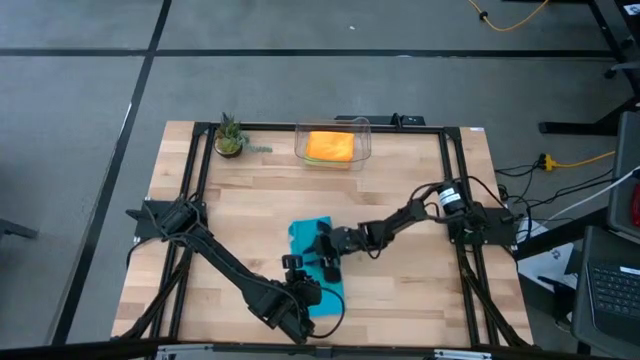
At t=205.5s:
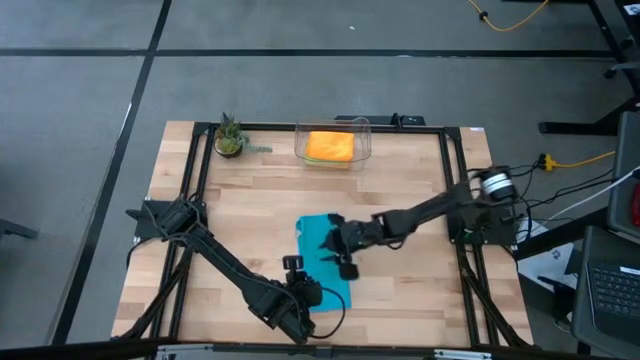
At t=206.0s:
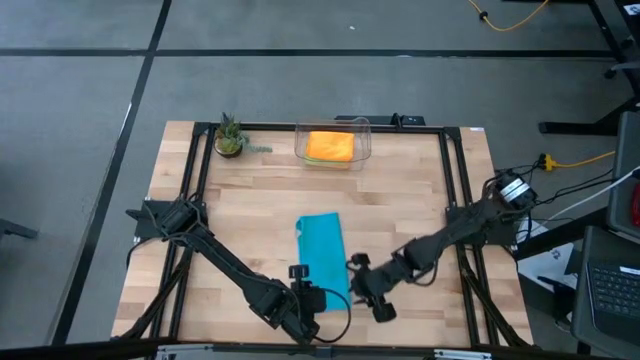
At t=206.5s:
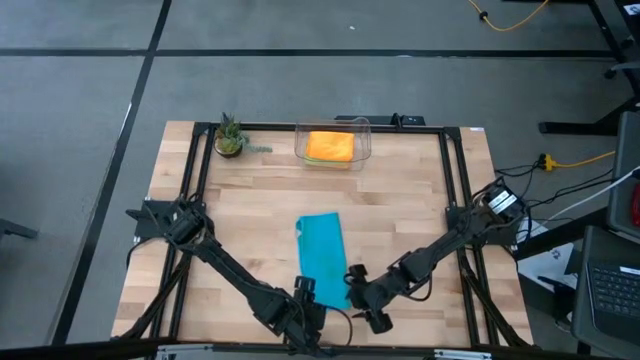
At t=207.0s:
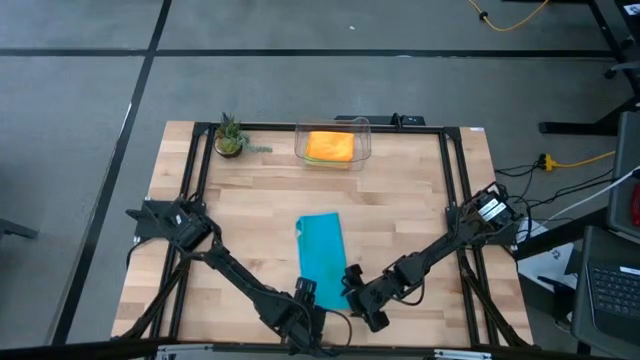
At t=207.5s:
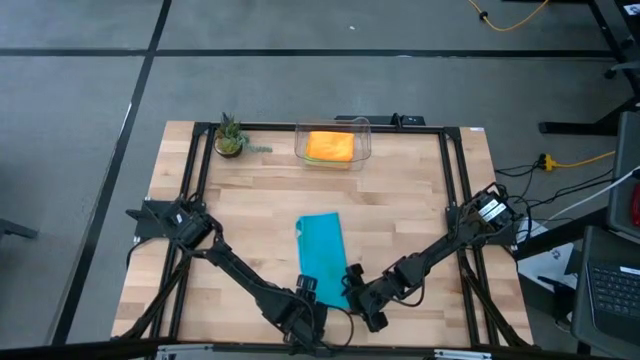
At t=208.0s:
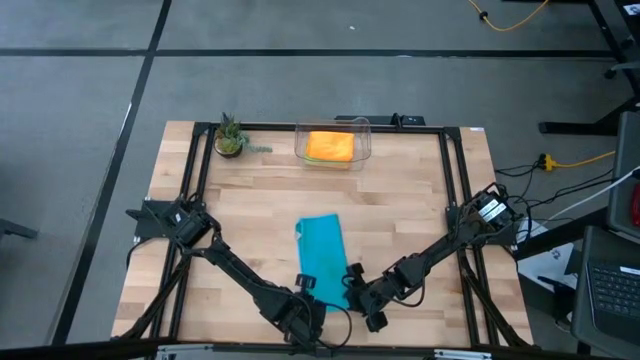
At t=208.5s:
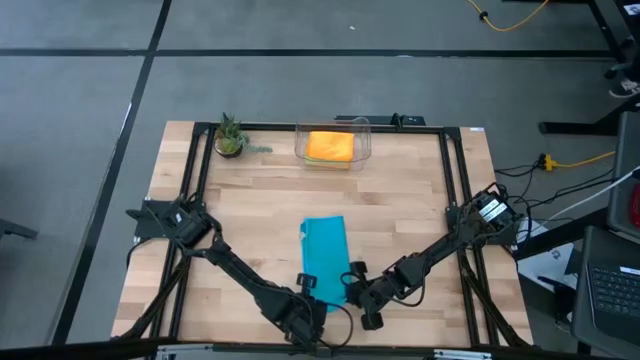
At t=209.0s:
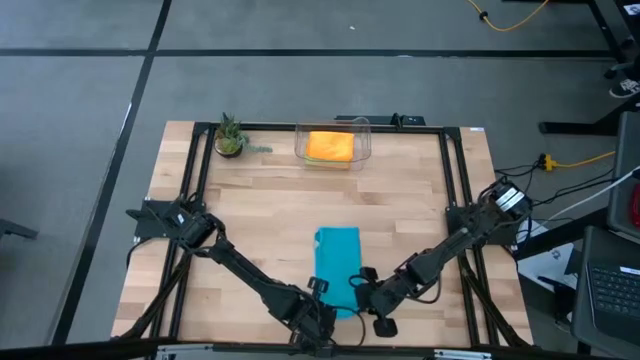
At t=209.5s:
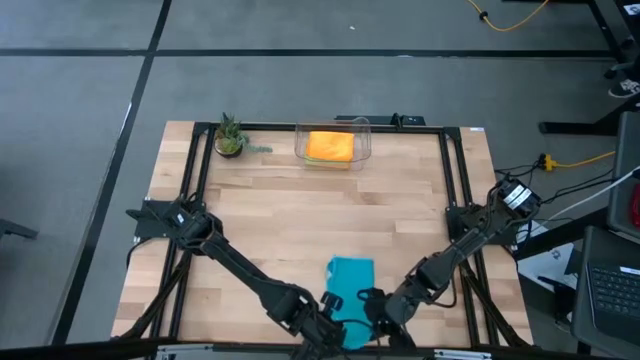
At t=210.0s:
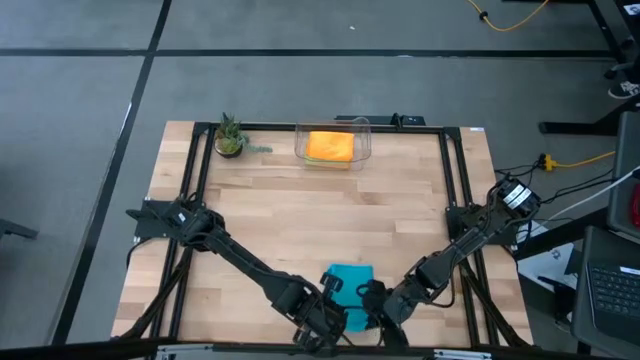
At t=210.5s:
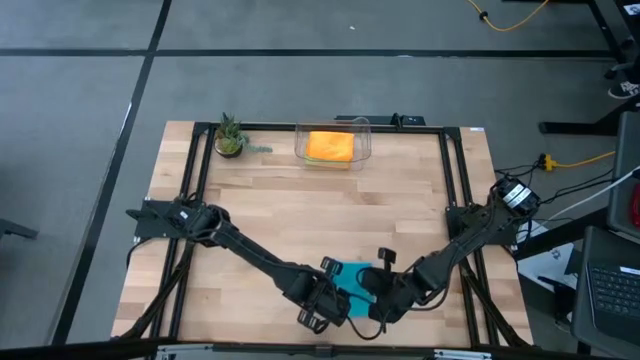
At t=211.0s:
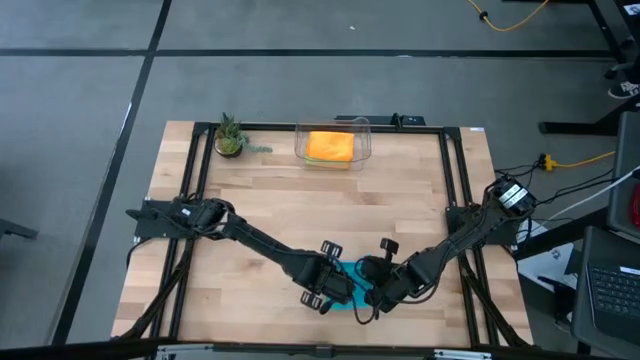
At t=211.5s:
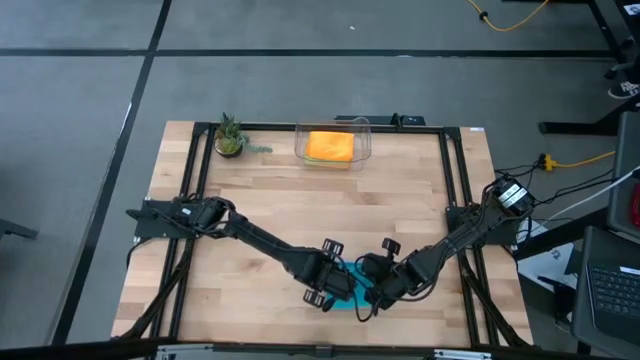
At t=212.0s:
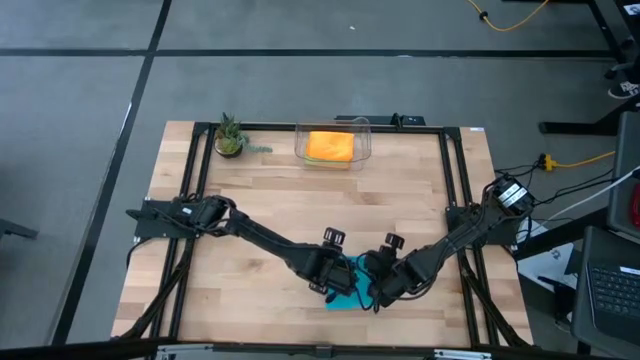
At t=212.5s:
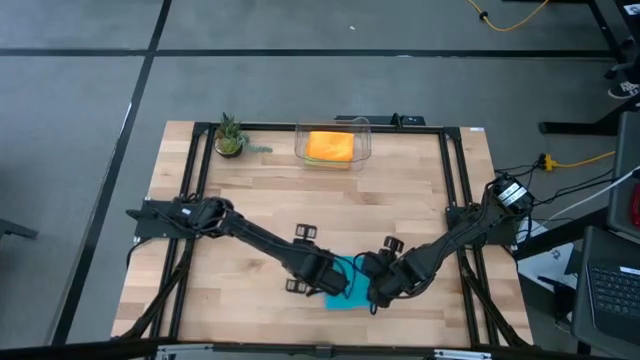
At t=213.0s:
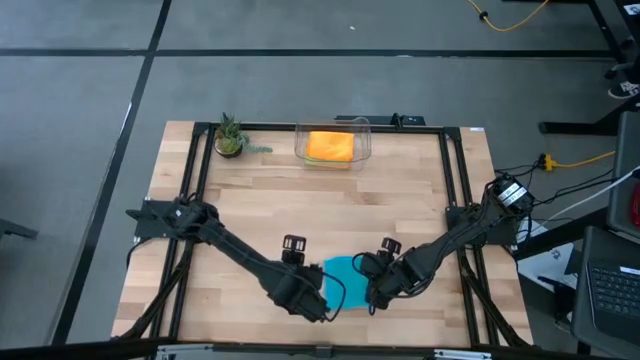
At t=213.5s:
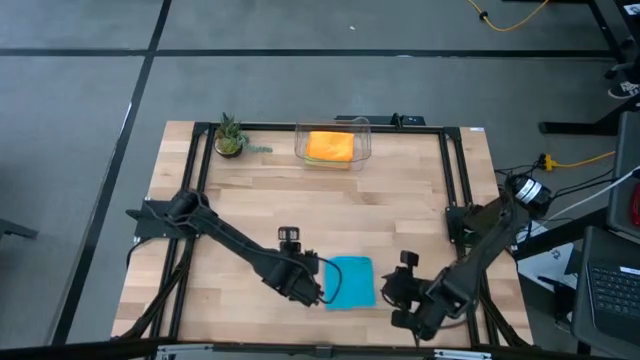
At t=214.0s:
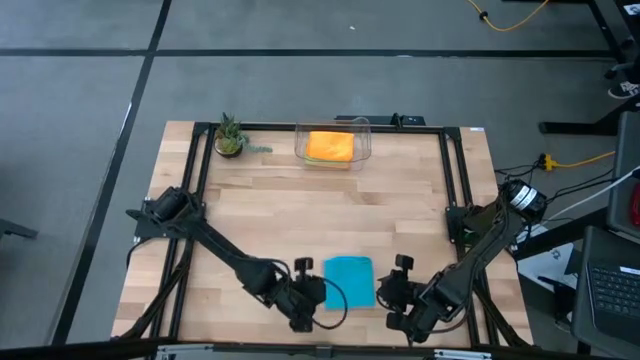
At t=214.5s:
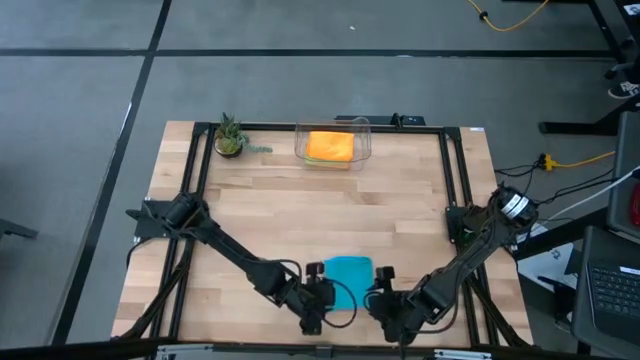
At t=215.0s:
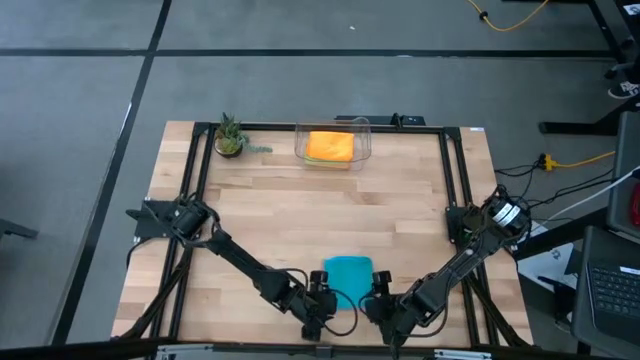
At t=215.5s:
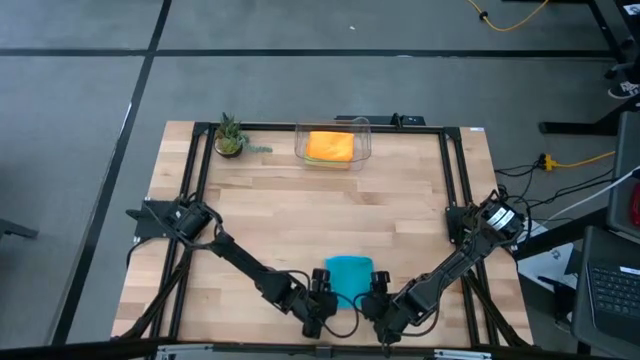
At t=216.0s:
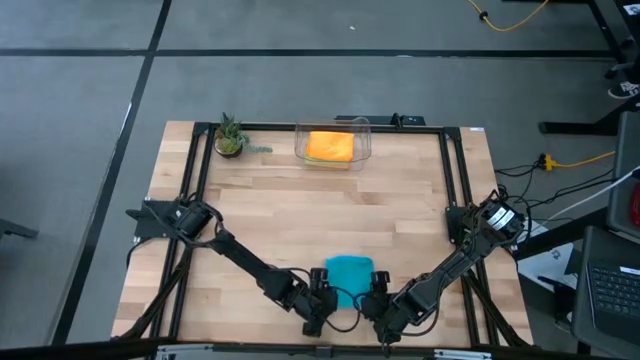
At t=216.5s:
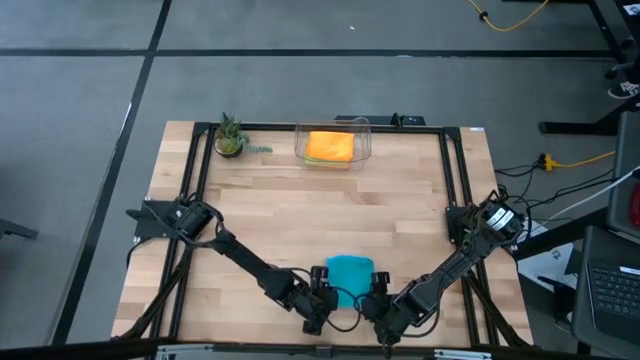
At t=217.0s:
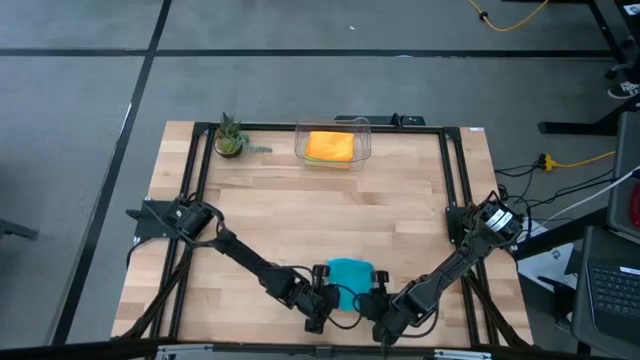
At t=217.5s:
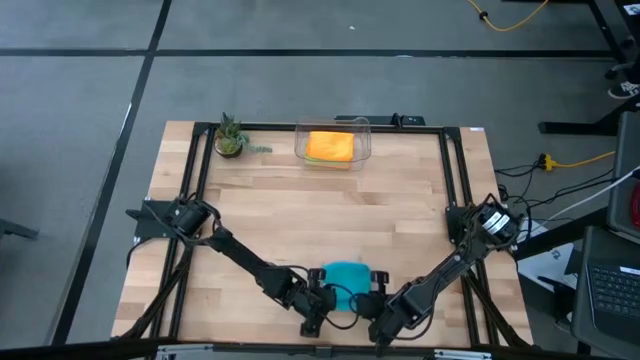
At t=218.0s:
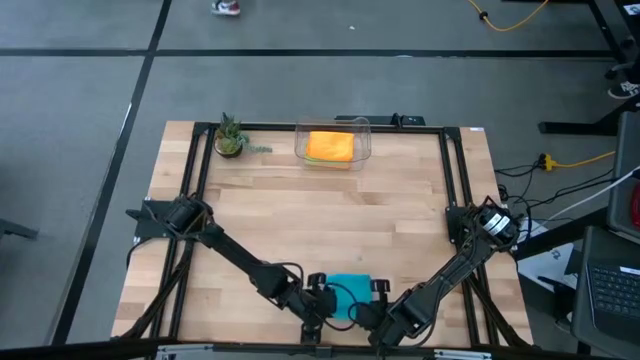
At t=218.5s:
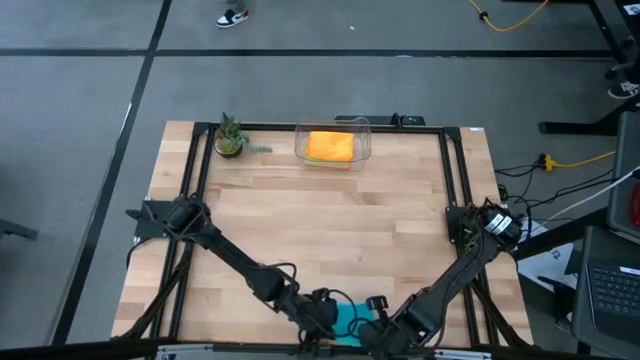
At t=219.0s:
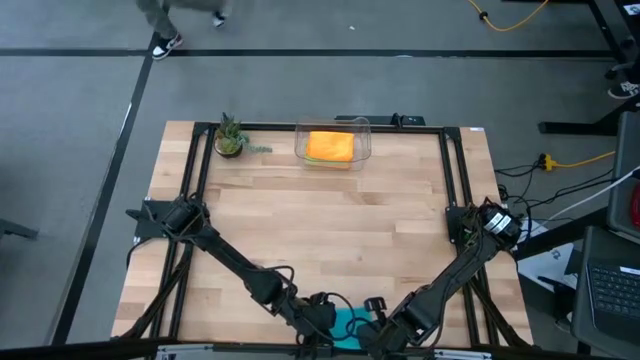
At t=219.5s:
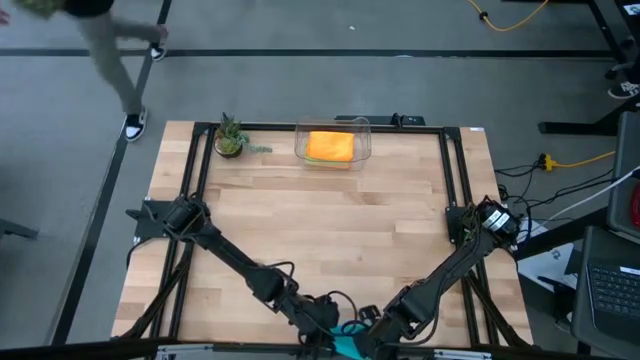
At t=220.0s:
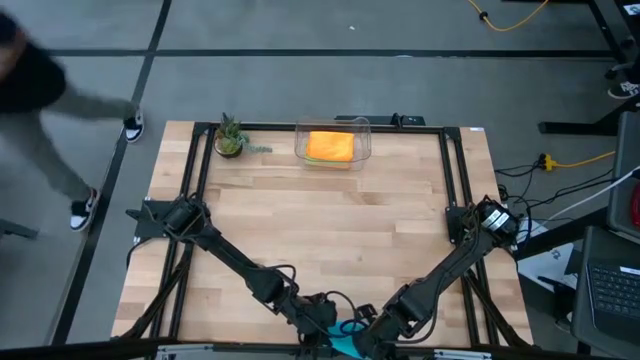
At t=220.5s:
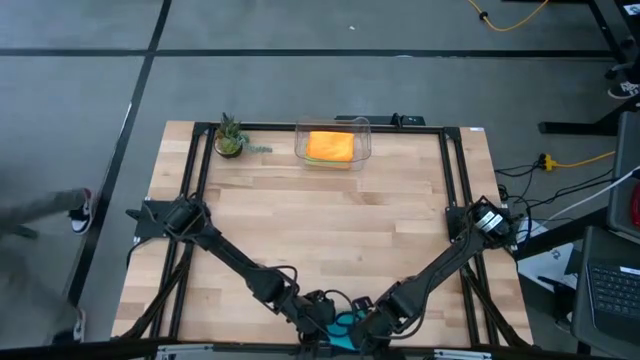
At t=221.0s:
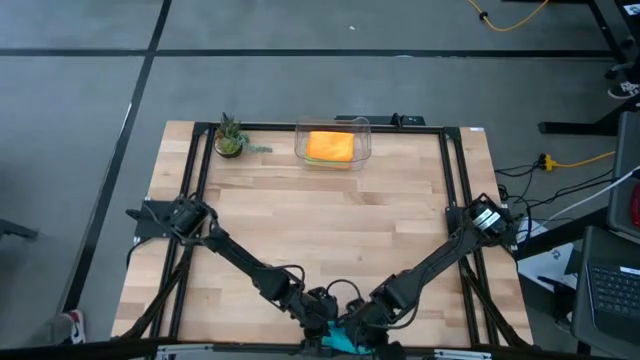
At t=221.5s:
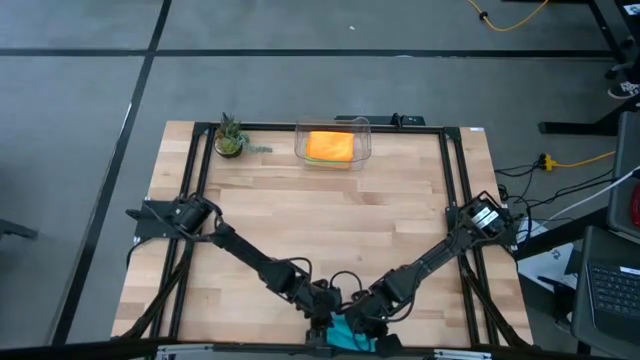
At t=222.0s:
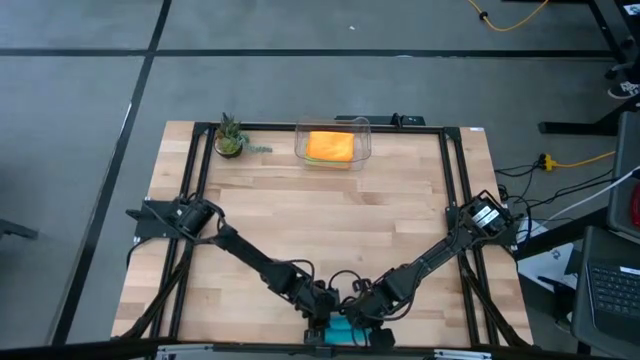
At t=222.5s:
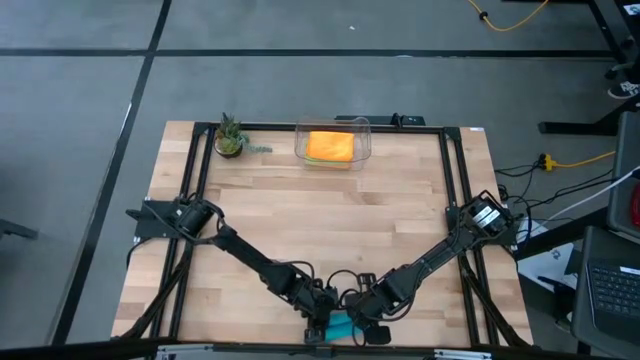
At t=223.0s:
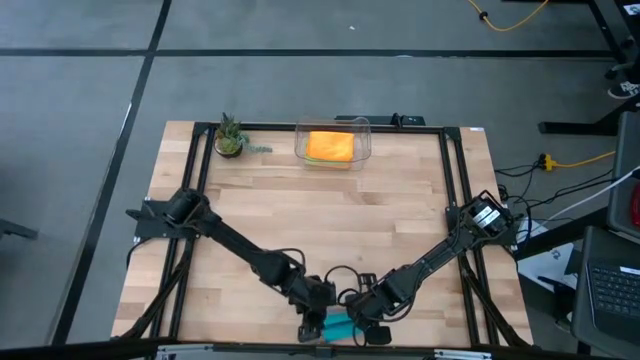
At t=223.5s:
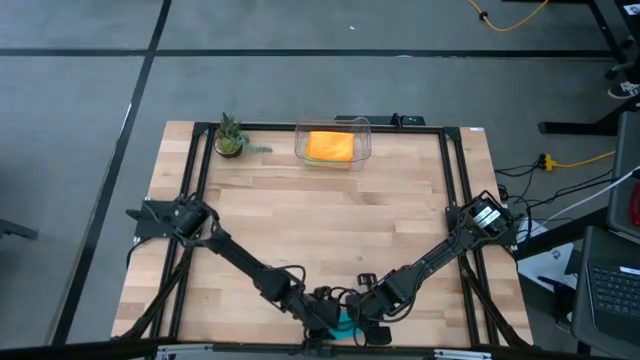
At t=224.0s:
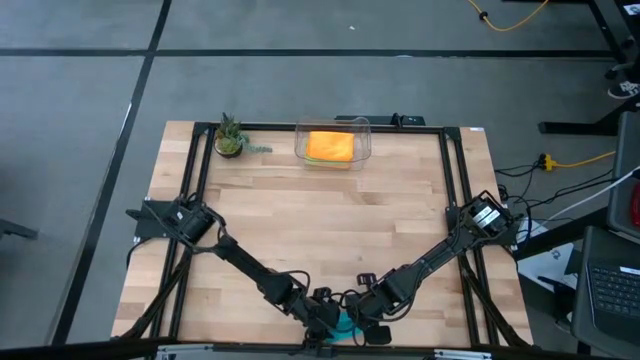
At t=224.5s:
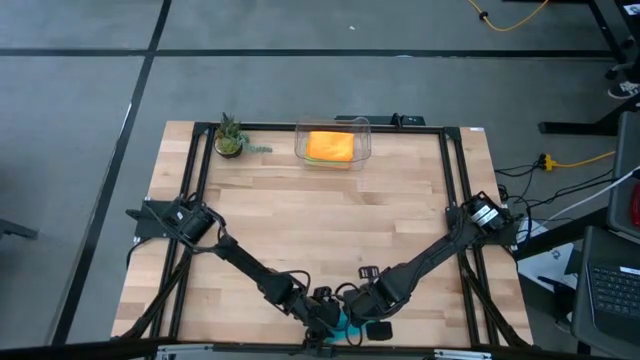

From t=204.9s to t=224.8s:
Task: Fold microfiber towels
Fold the blue microfiber cloth

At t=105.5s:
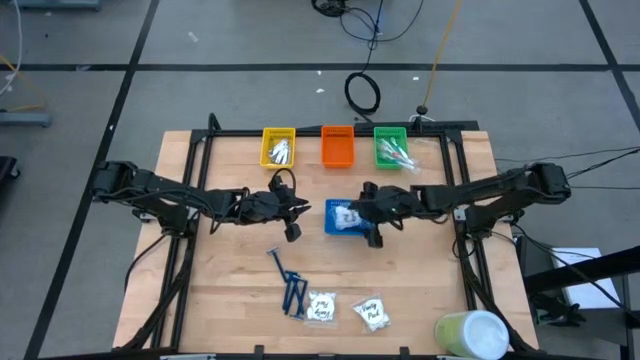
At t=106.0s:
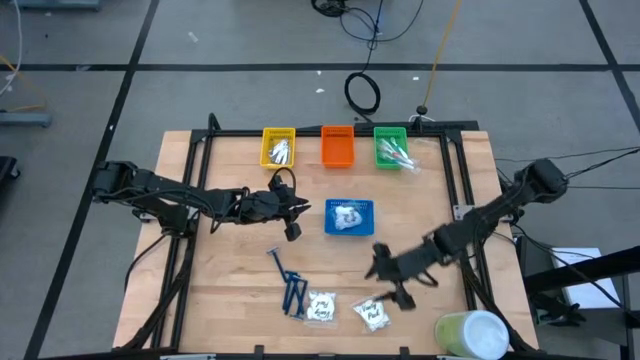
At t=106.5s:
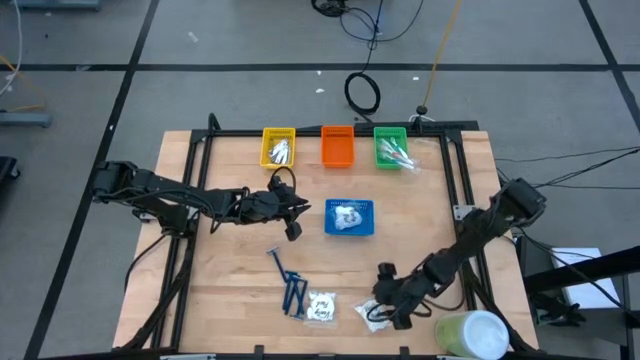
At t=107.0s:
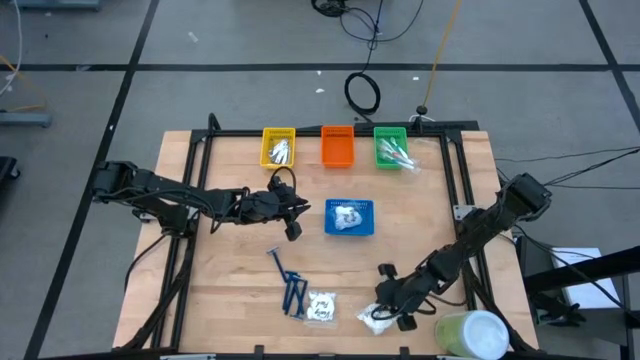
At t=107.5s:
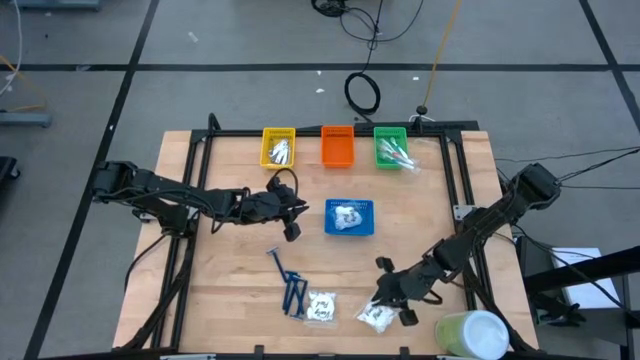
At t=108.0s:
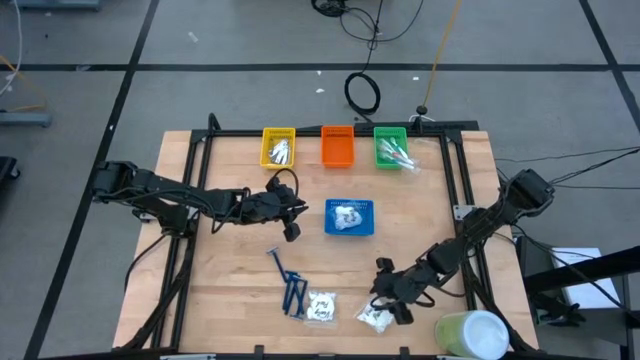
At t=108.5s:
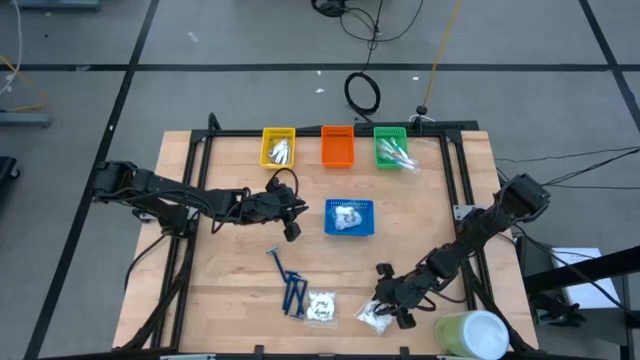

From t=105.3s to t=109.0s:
Task: Pick & Place Travel size toiletries
Put the white cotton pack into the blue basket
